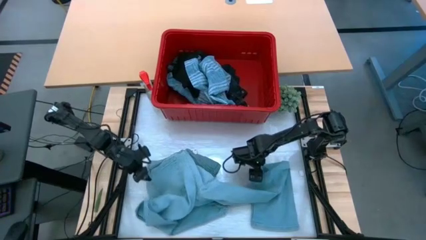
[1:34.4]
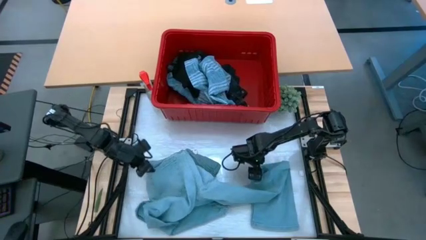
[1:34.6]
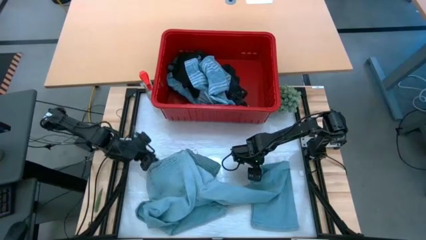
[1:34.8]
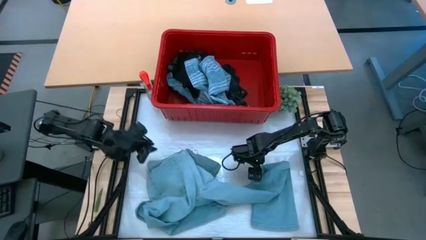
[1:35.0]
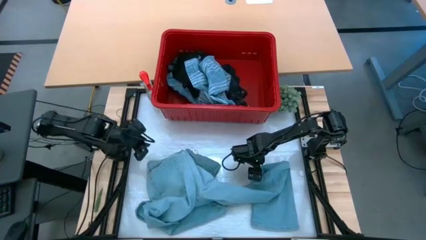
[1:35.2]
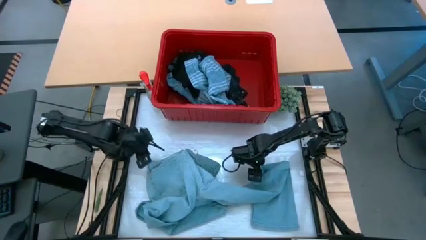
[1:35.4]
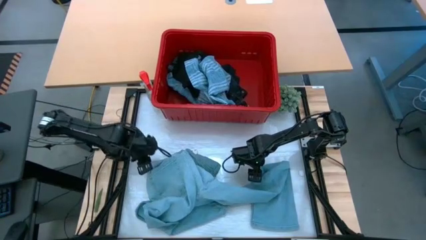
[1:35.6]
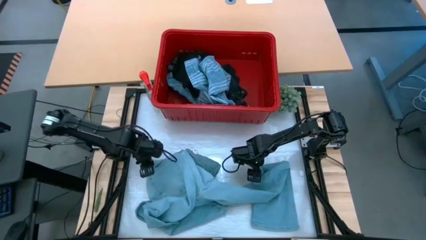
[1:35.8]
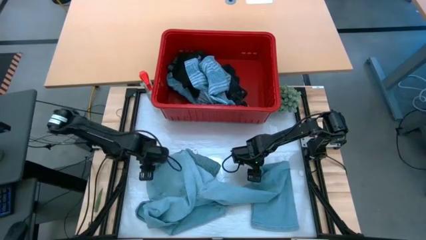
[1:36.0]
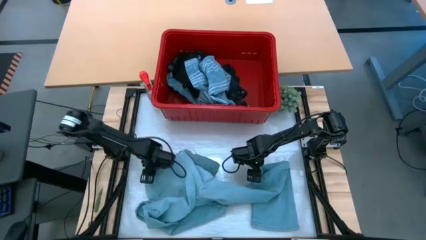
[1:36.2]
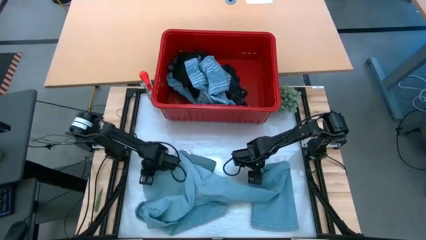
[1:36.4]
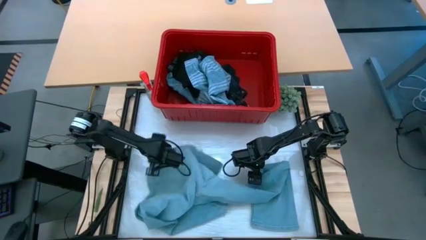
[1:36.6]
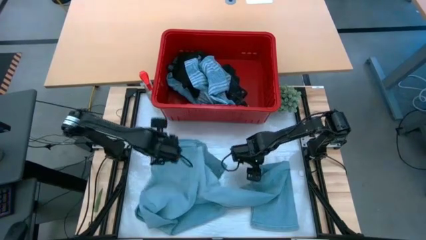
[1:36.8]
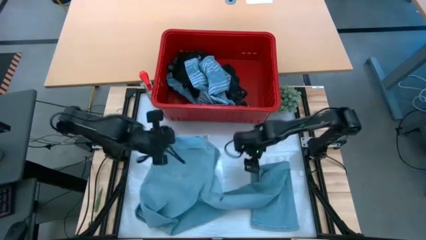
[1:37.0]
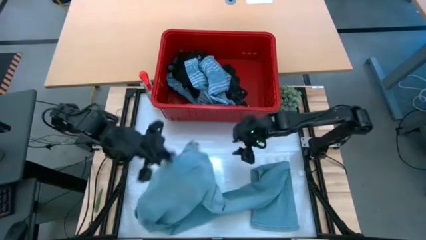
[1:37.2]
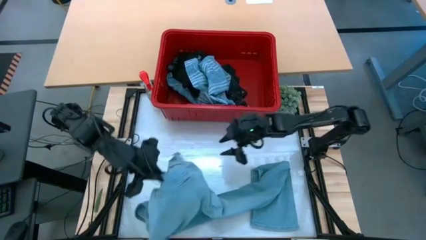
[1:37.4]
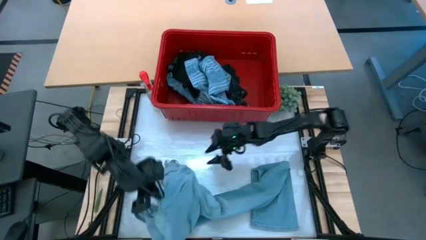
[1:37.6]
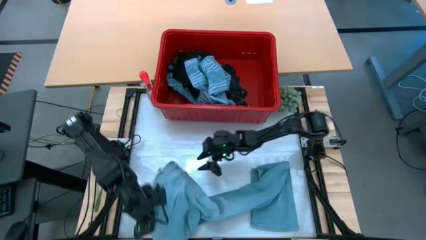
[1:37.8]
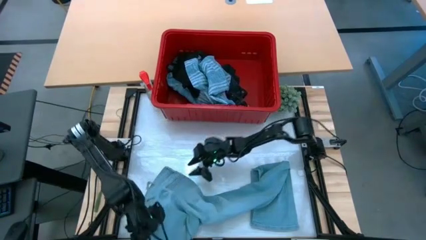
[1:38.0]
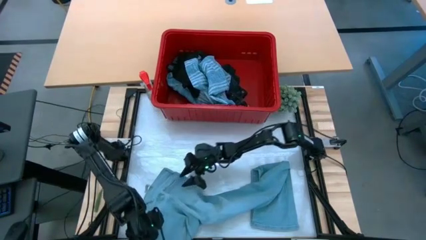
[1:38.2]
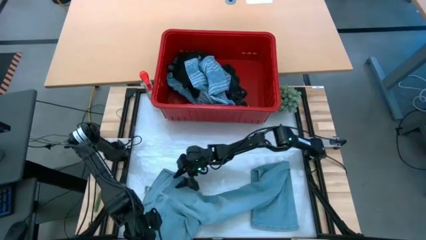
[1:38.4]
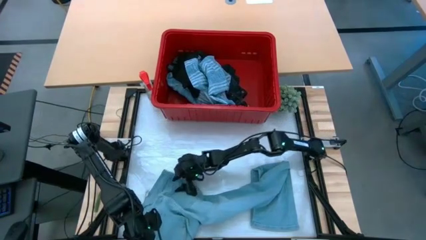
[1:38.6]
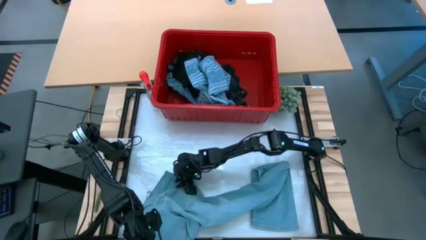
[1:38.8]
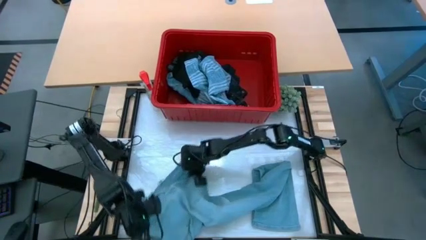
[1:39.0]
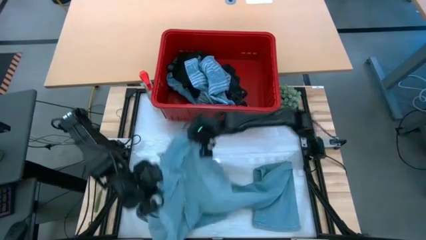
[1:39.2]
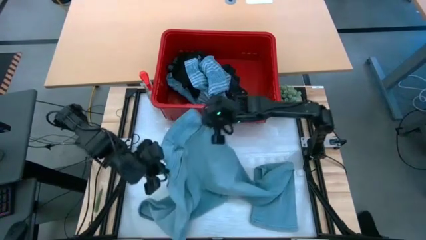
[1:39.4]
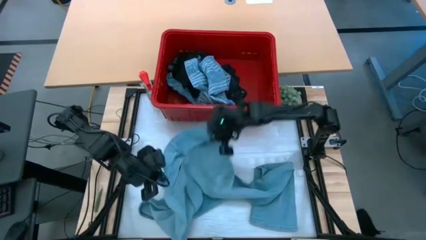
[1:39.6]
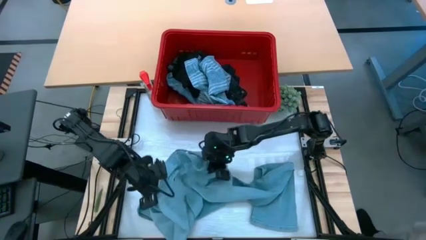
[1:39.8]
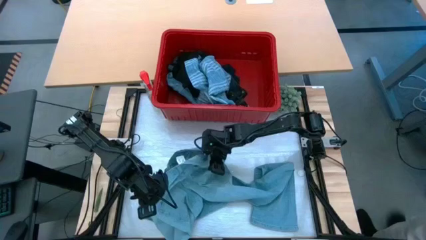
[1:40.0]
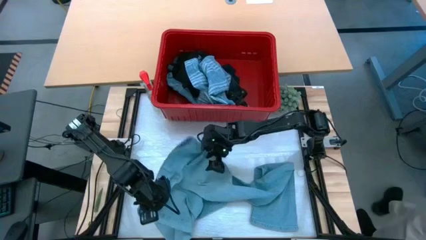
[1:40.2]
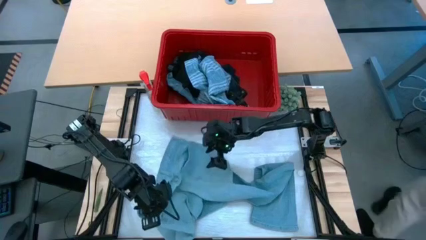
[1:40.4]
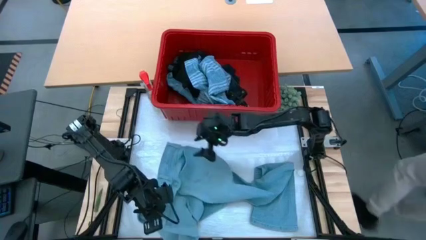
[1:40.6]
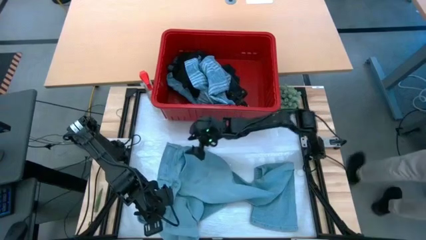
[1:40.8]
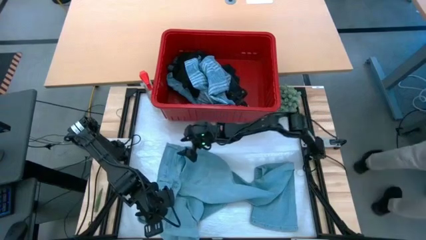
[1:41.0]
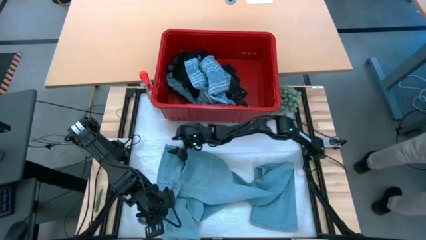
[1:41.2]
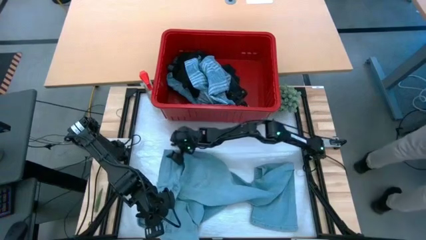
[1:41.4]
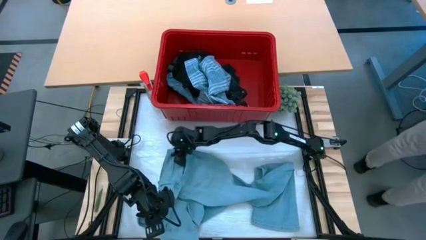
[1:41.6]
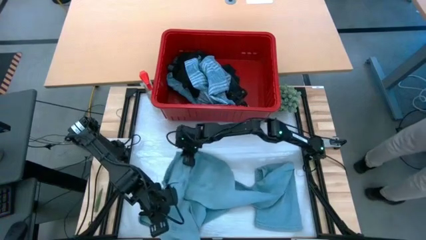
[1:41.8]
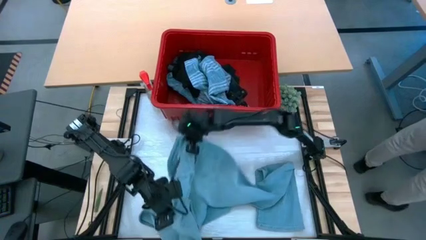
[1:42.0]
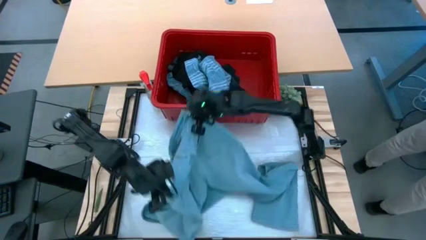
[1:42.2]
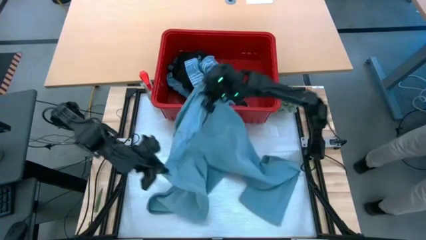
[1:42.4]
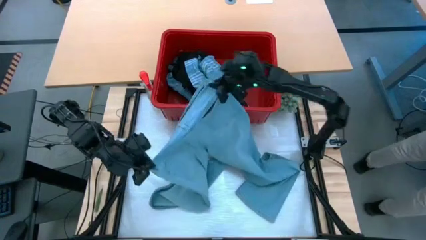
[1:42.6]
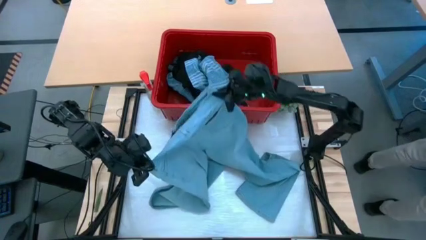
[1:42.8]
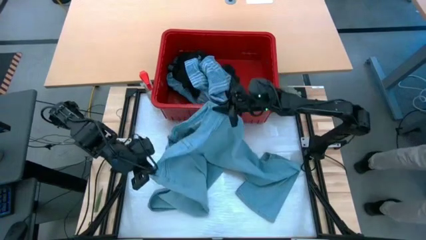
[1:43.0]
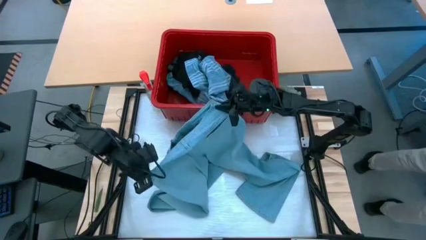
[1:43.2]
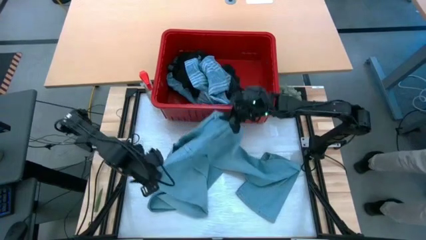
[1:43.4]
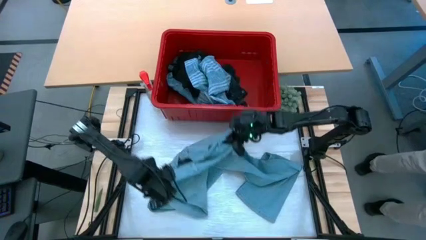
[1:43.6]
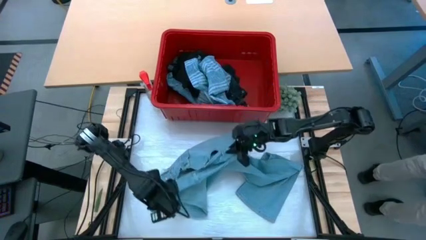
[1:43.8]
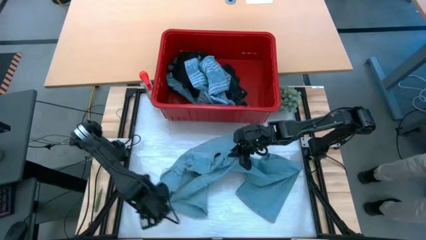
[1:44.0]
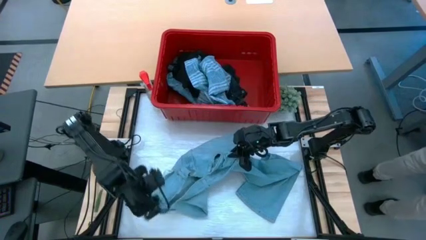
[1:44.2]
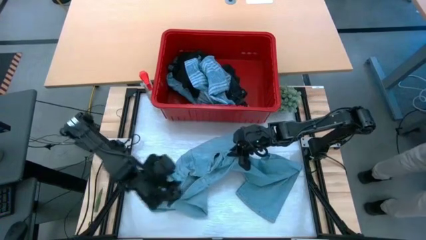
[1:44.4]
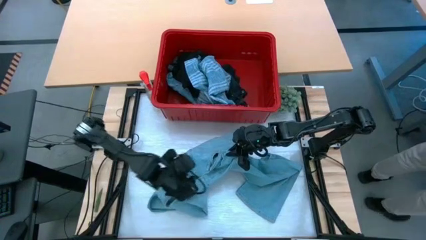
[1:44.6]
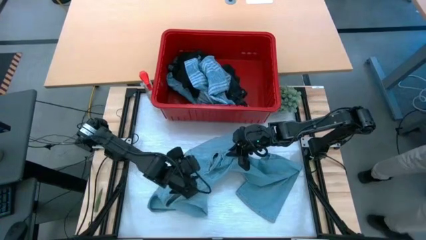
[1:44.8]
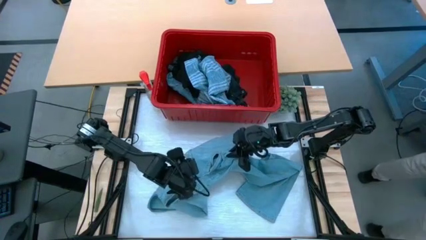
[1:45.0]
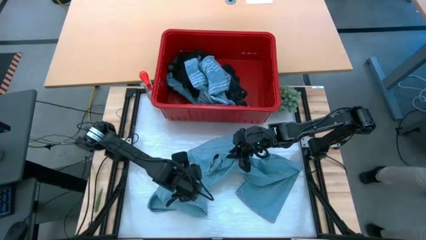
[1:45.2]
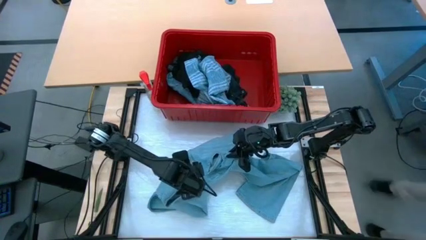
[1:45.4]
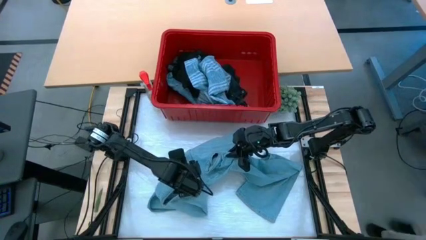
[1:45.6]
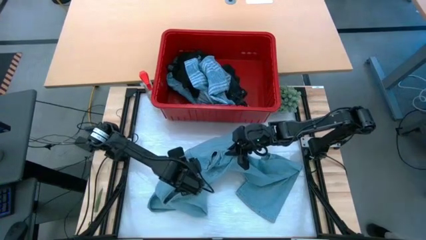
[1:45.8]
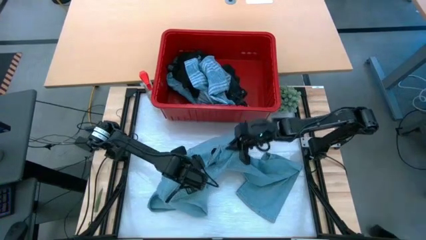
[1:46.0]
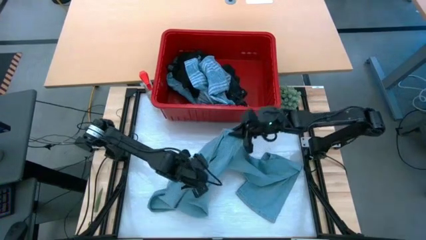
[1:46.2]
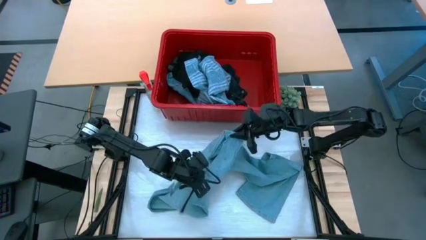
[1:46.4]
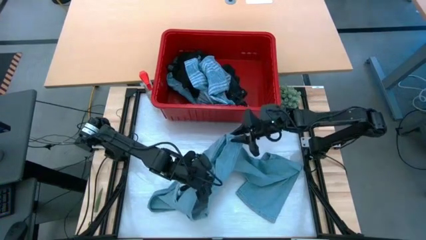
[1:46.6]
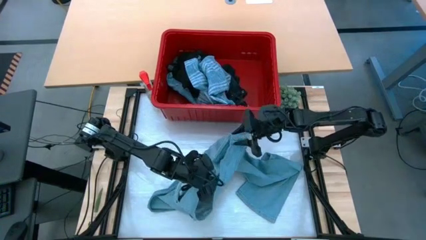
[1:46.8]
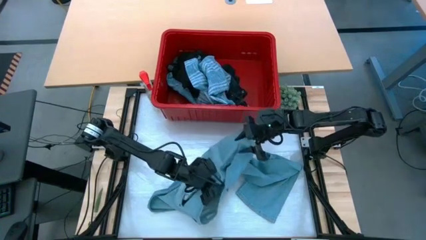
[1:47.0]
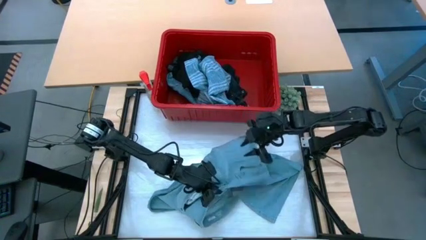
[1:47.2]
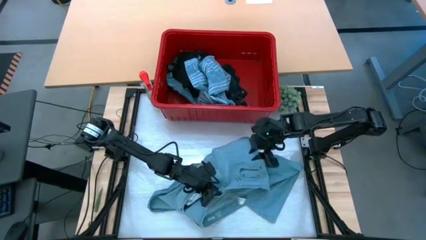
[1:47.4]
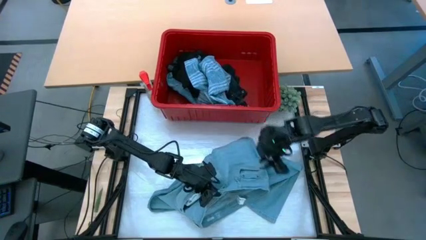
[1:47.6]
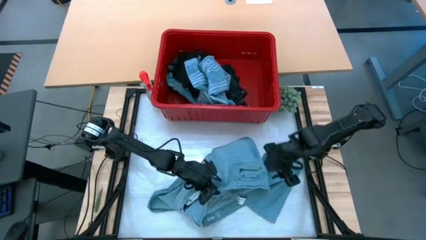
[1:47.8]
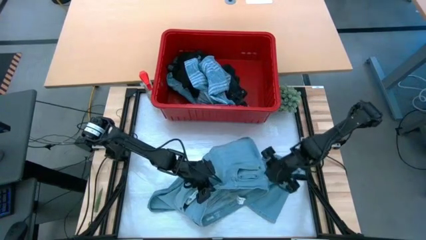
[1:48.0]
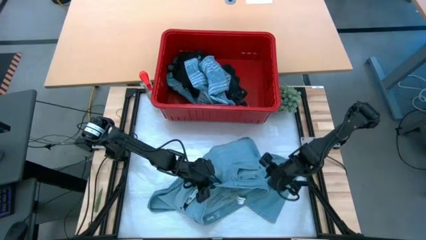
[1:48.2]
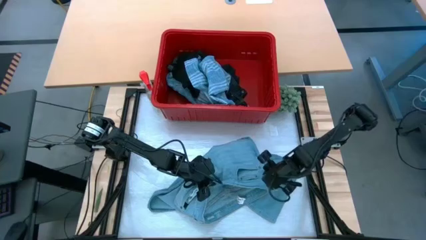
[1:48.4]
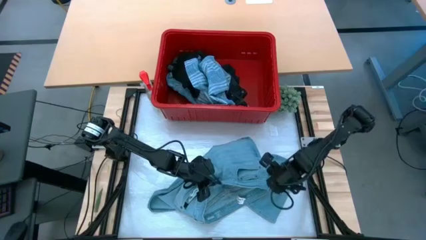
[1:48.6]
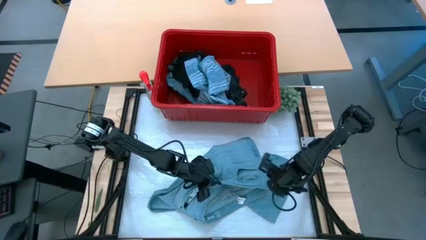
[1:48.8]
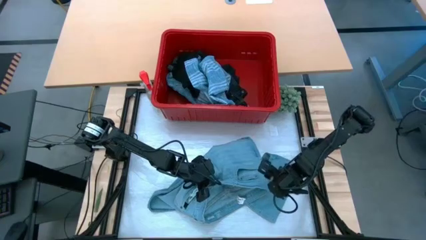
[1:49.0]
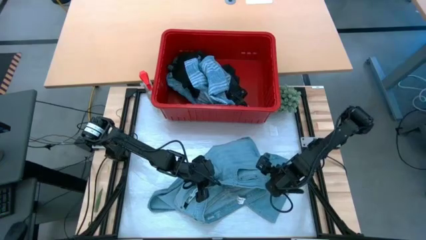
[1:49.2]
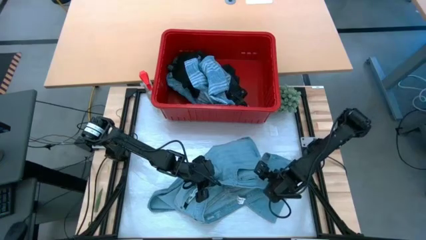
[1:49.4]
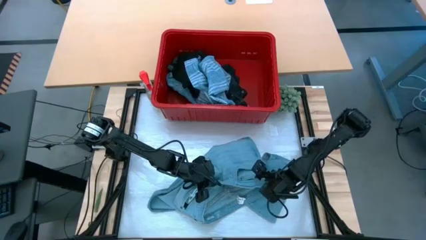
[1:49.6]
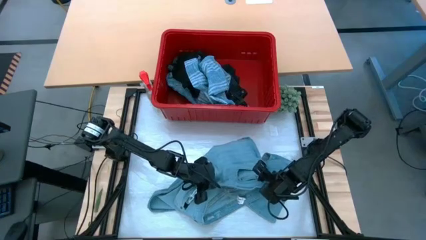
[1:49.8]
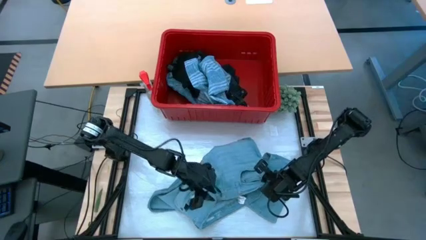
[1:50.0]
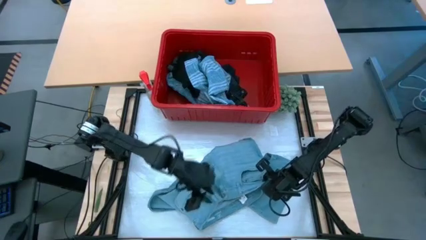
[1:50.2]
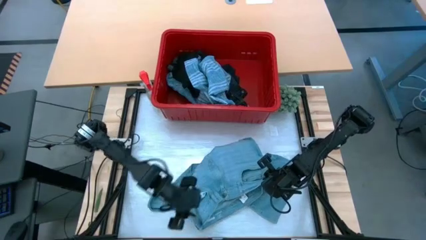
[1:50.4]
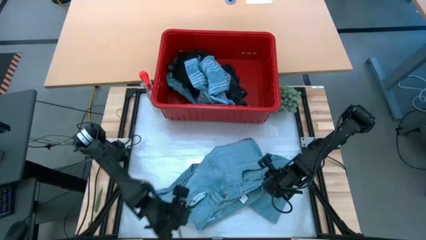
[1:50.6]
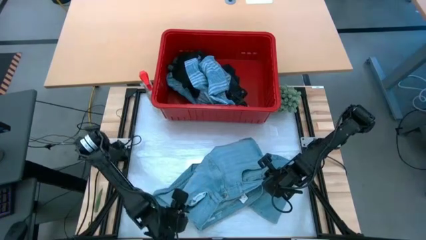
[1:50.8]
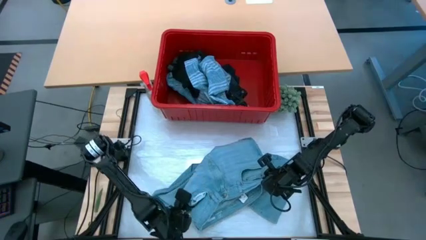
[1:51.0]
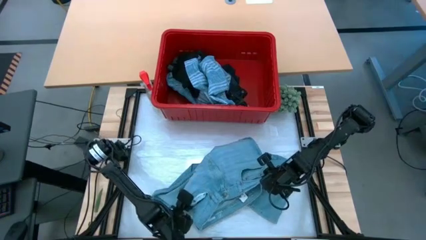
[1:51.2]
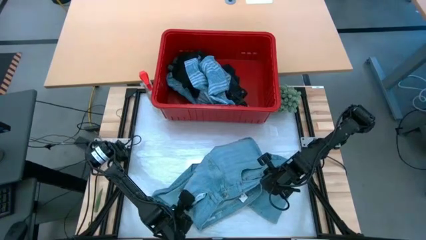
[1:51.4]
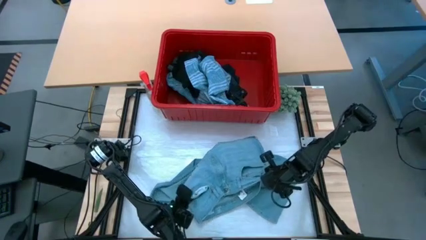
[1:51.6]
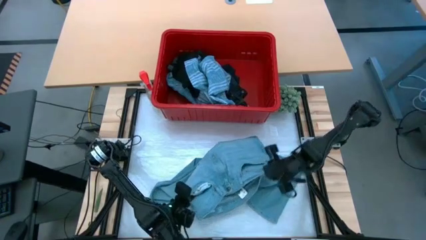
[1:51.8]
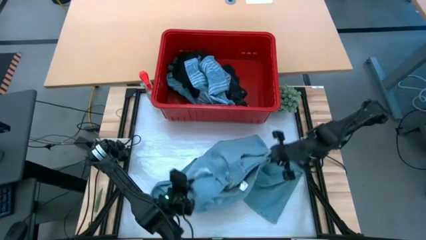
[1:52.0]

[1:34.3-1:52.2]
Task: Fold Laundry from Bin
Fold the light blue pants

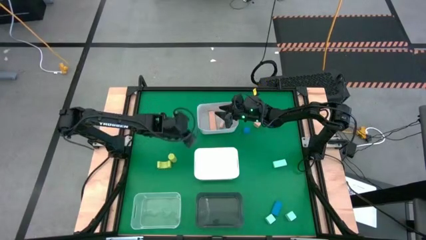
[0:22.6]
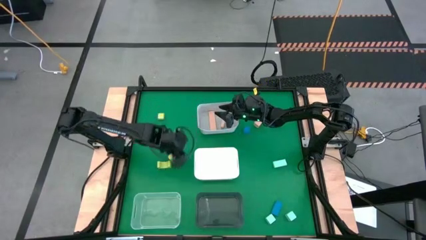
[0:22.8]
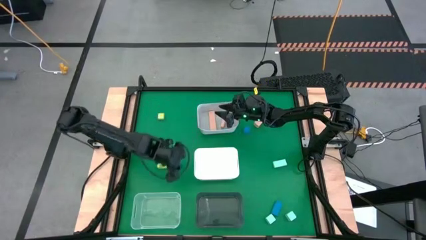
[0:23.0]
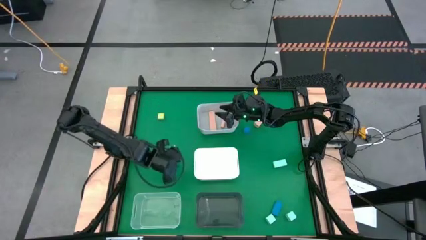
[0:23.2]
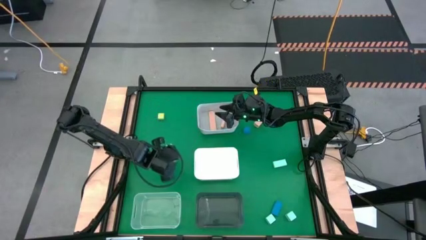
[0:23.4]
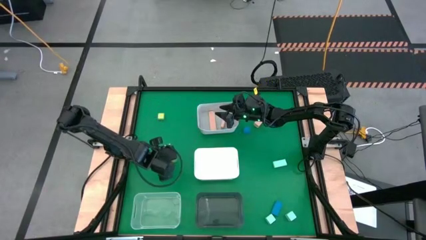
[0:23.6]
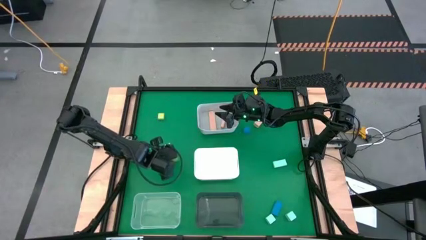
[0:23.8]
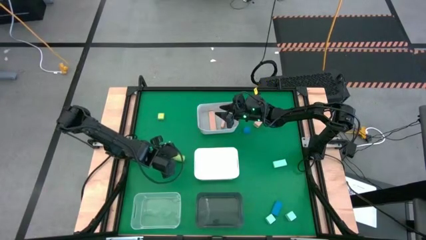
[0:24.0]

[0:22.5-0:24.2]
Task: Sort & place blocks by color
Put the bottom right green block into the white bin
